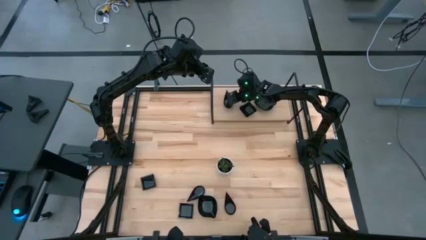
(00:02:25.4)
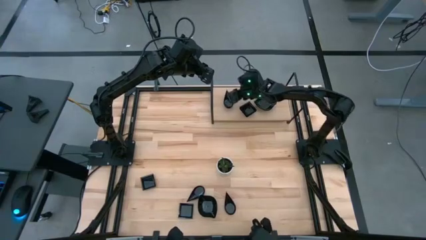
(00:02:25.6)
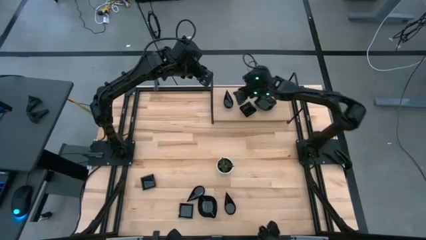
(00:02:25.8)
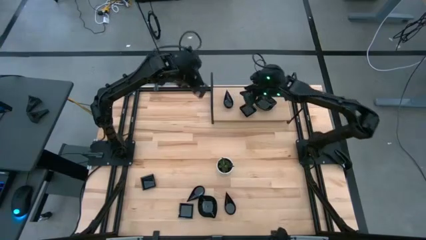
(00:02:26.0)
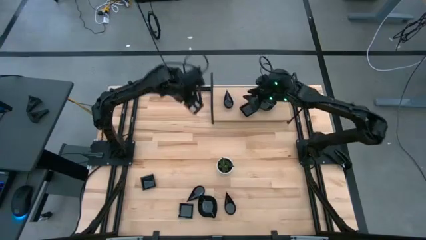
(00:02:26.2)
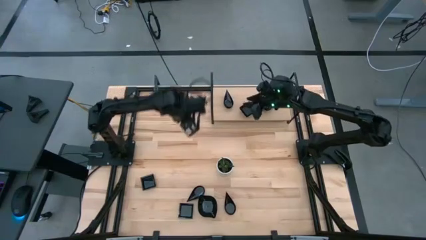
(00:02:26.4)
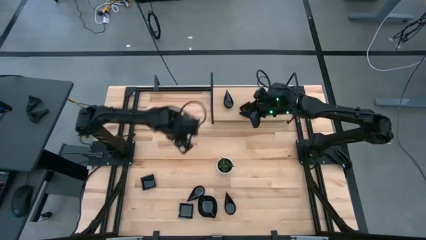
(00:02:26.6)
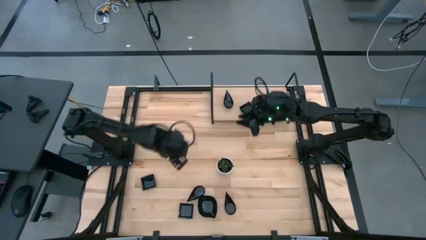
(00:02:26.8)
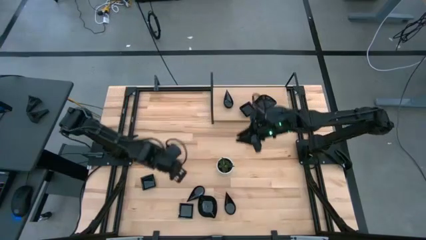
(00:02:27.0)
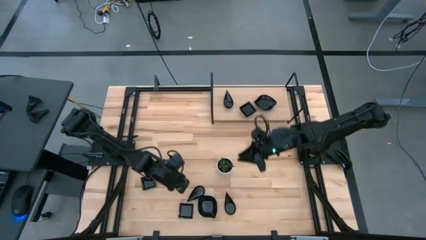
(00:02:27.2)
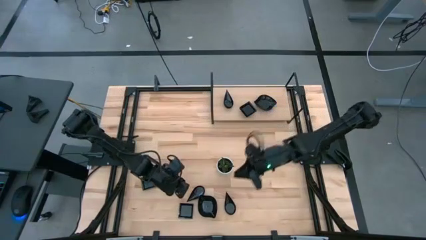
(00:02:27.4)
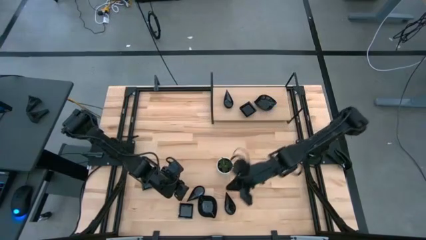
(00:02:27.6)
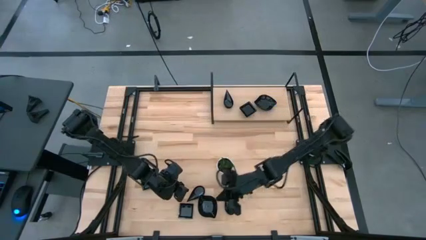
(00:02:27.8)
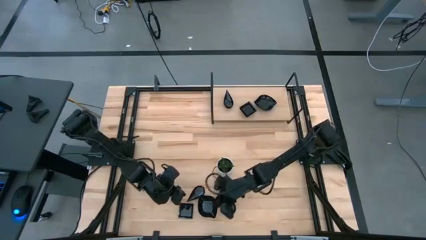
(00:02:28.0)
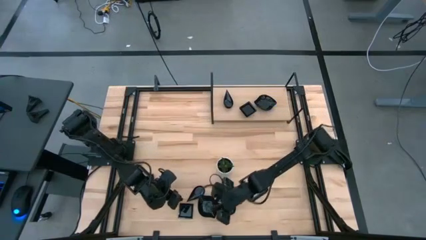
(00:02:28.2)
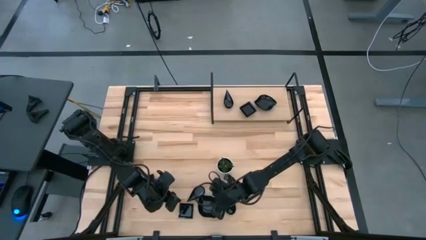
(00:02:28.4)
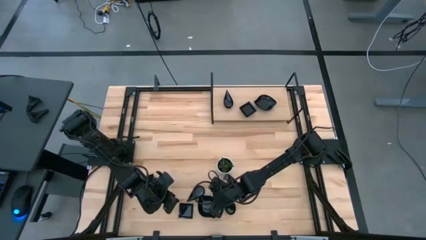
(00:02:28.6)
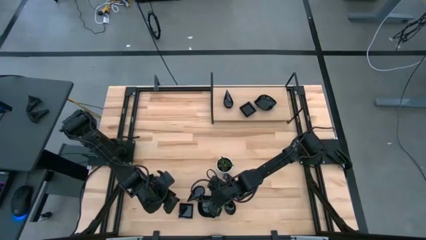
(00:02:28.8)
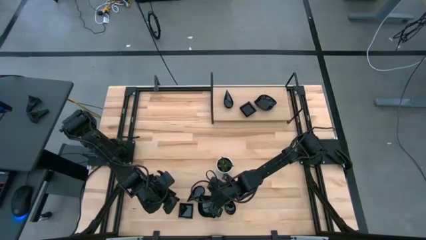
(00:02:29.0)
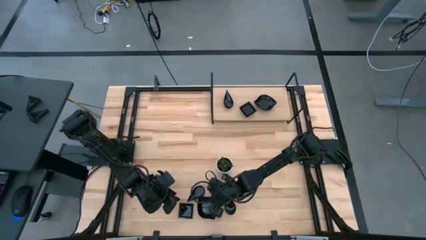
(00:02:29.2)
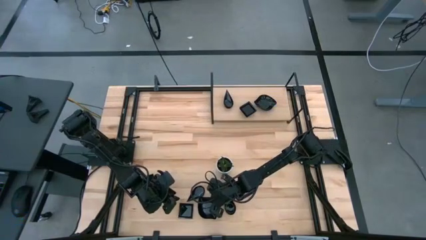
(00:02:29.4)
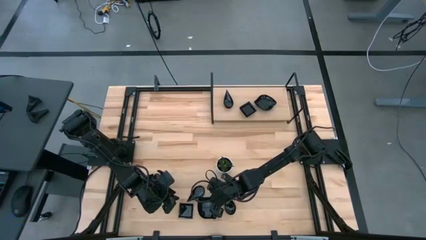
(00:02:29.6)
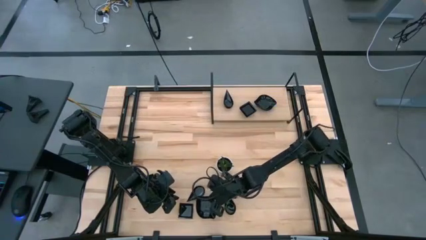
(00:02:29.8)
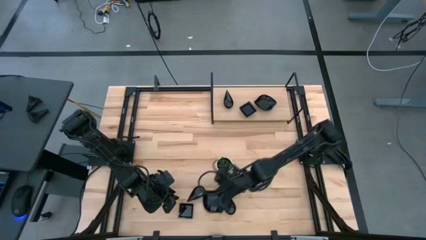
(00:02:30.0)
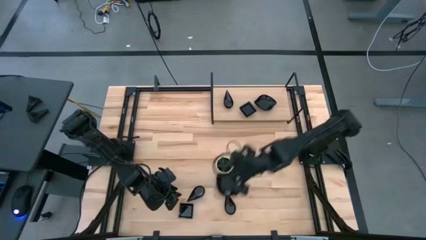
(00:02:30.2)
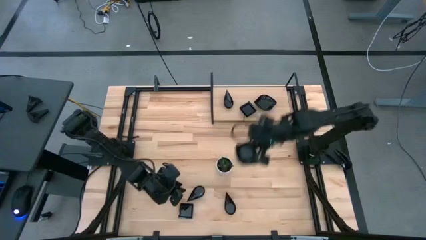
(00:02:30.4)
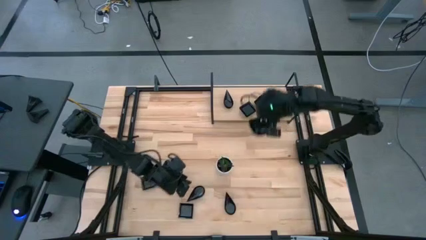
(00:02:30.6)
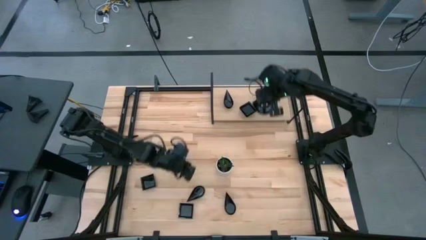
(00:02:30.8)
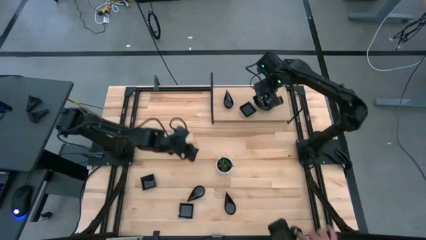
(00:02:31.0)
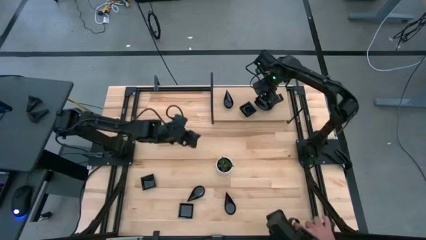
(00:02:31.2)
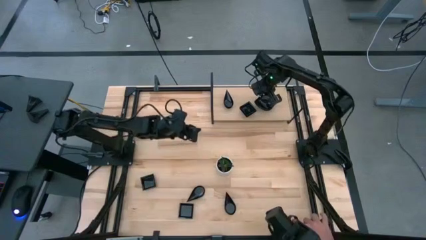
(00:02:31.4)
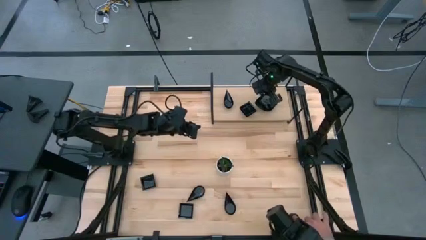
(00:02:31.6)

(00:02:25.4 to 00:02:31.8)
Task: Pick & Place Mini shaped plates
Stack the leaf shaped plate on top of the leaf shaped plate on the shelf

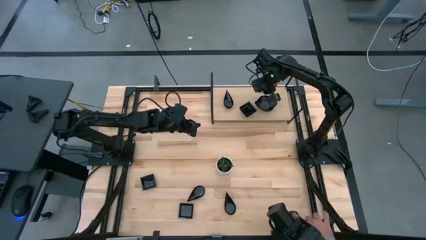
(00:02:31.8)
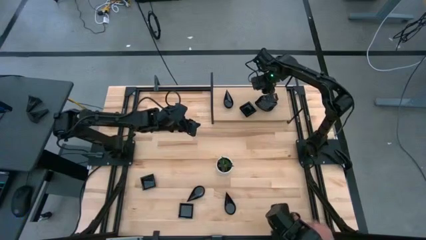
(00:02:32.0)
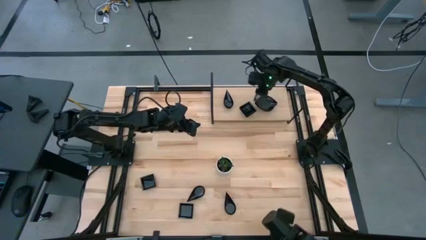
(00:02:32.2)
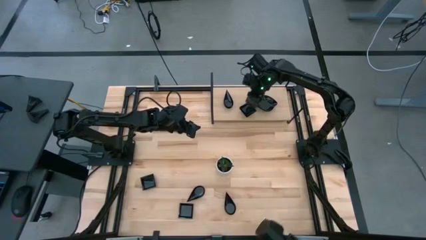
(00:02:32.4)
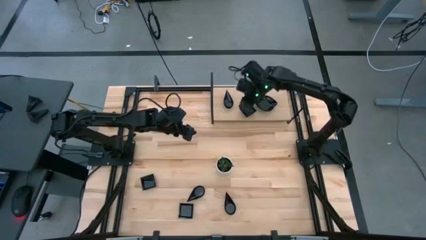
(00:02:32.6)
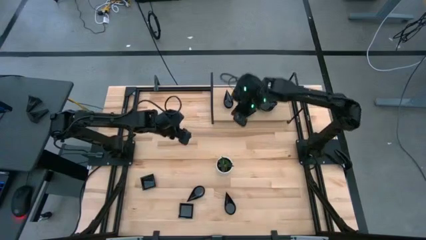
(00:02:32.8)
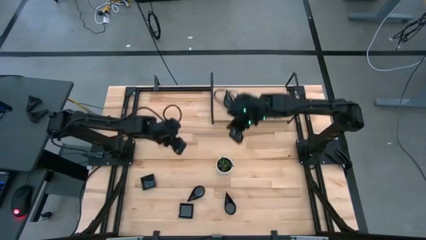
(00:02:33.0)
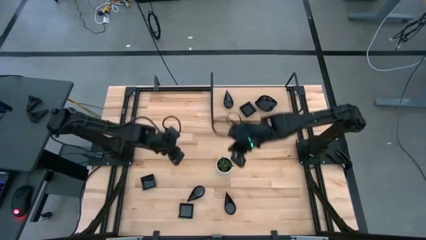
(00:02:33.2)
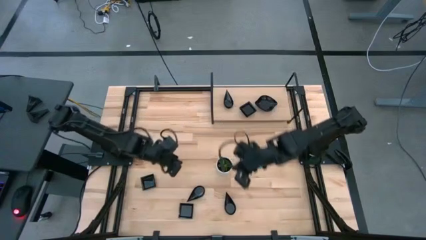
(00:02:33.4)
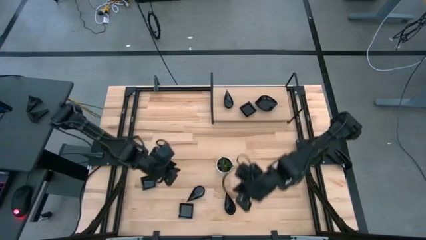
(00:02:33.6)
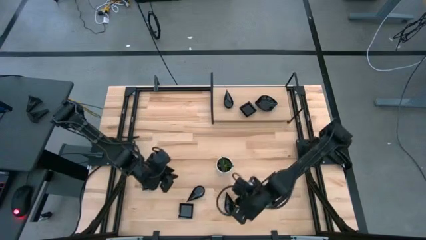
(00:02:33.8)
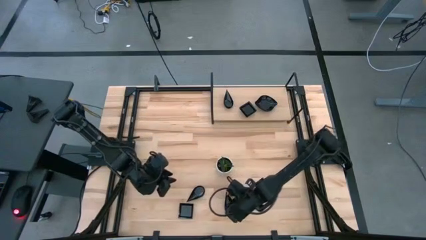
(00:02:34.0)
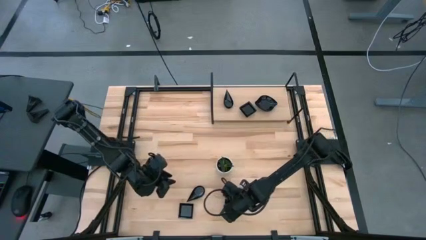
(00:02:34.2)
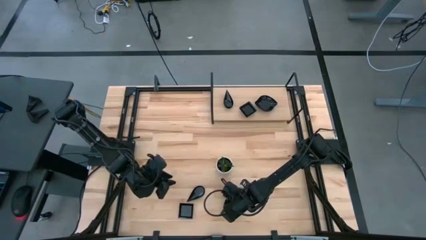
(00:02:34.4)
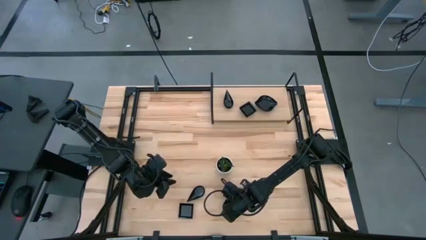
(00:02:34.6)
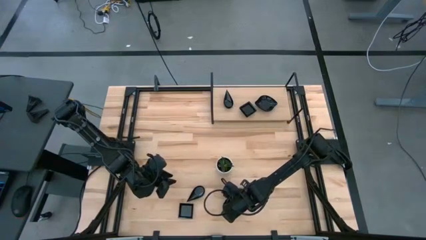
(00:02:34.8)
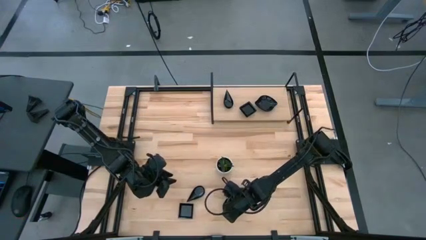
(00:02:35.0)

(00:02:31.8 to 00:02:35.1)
Stack the drop shaped plate on top of the drop shaped plate on the shelf

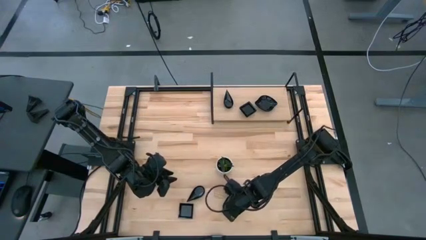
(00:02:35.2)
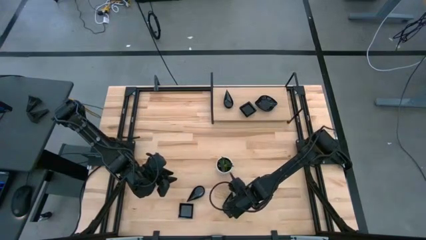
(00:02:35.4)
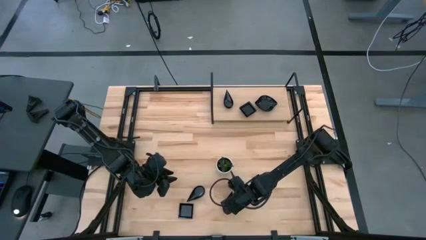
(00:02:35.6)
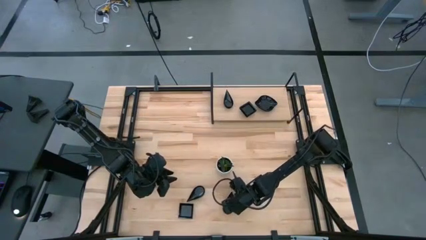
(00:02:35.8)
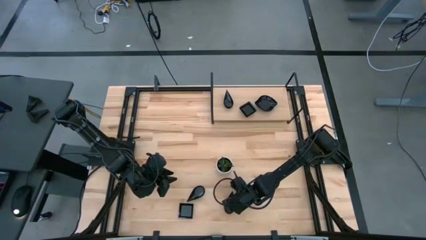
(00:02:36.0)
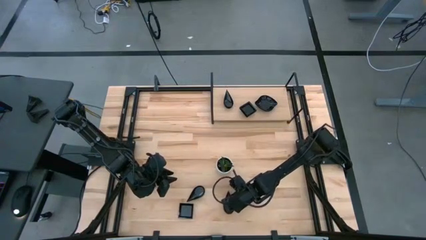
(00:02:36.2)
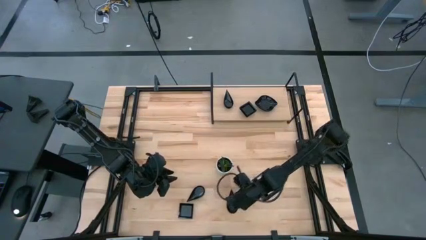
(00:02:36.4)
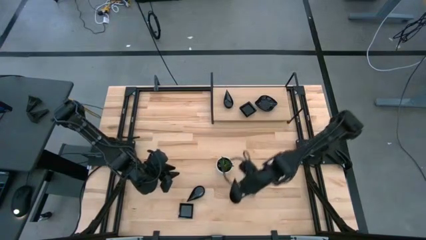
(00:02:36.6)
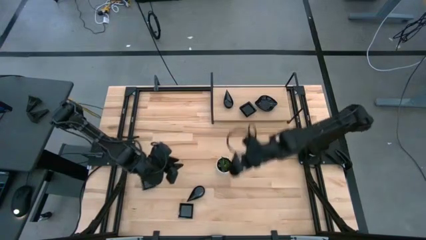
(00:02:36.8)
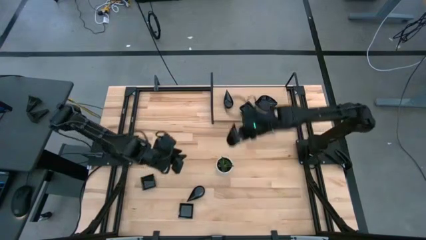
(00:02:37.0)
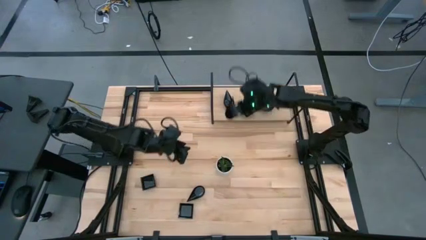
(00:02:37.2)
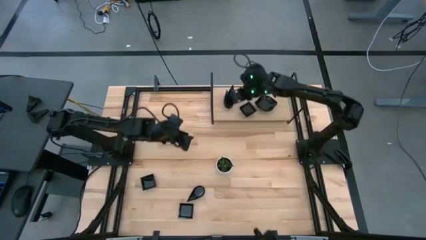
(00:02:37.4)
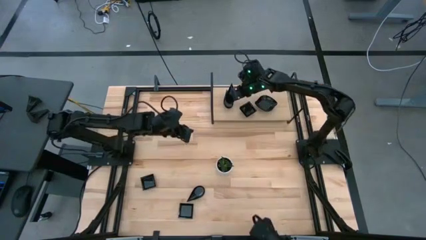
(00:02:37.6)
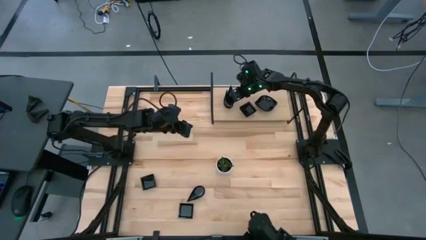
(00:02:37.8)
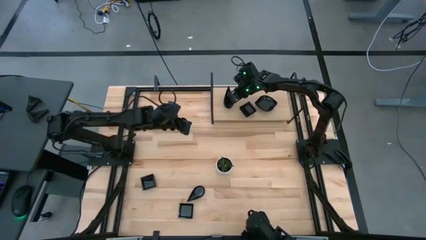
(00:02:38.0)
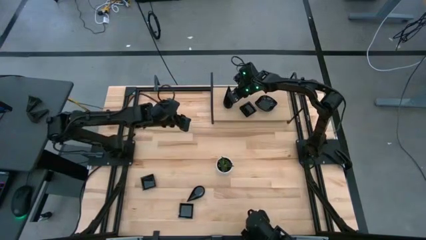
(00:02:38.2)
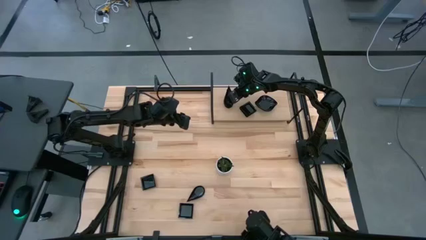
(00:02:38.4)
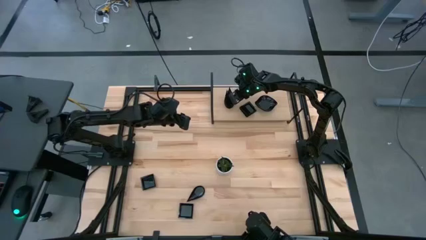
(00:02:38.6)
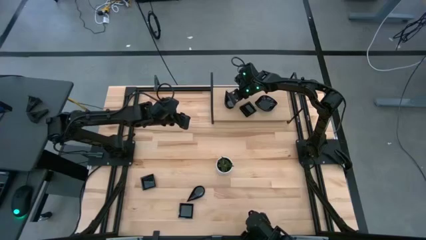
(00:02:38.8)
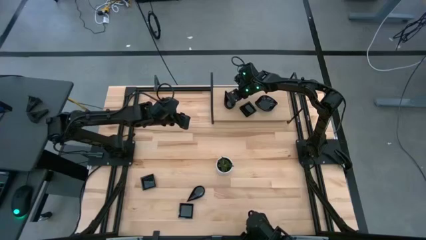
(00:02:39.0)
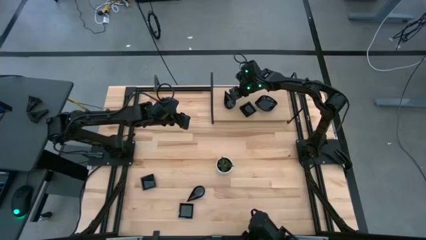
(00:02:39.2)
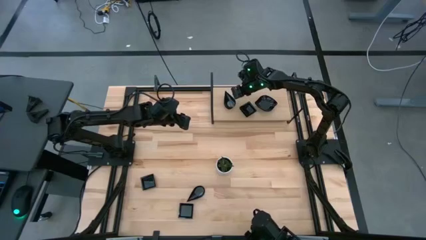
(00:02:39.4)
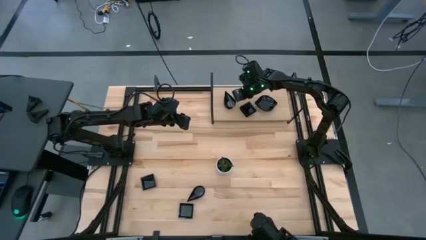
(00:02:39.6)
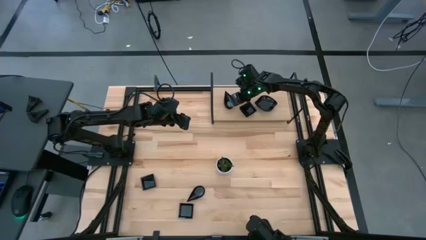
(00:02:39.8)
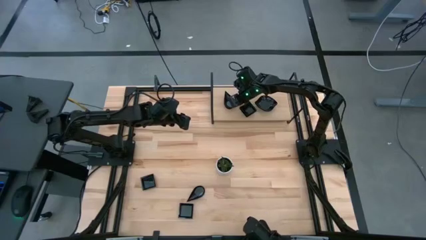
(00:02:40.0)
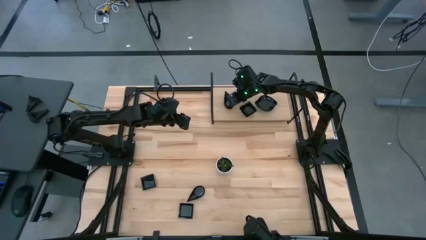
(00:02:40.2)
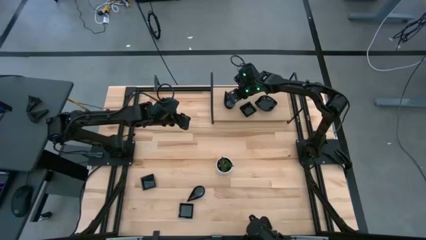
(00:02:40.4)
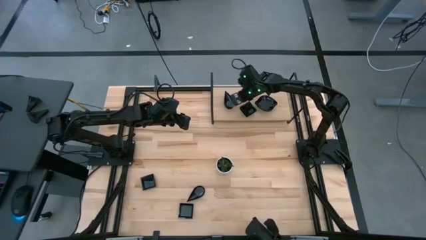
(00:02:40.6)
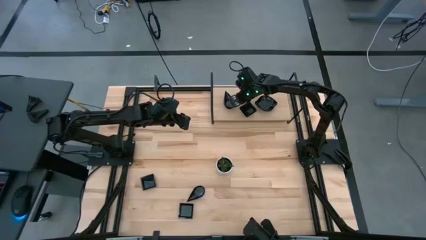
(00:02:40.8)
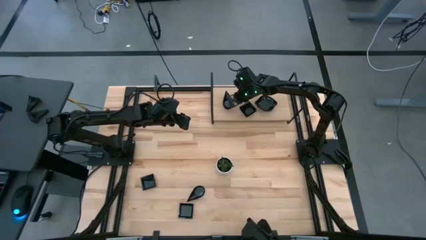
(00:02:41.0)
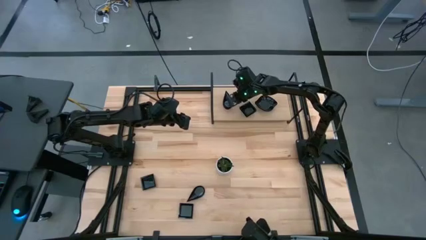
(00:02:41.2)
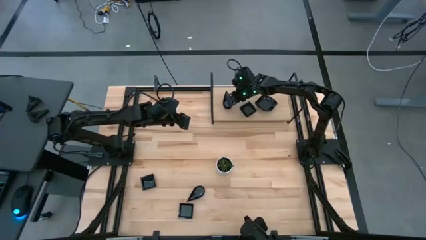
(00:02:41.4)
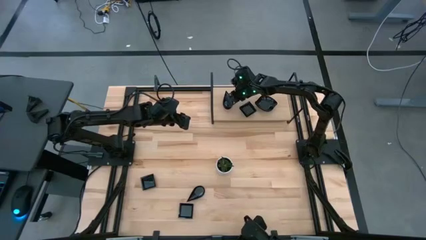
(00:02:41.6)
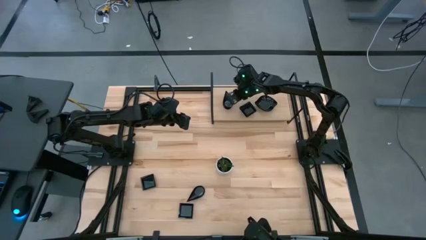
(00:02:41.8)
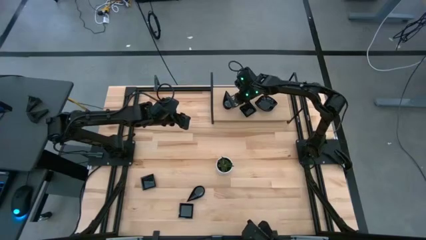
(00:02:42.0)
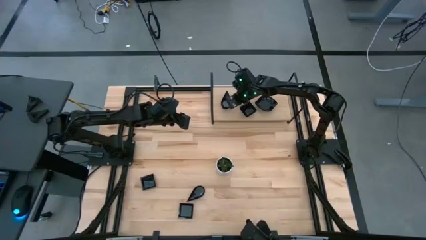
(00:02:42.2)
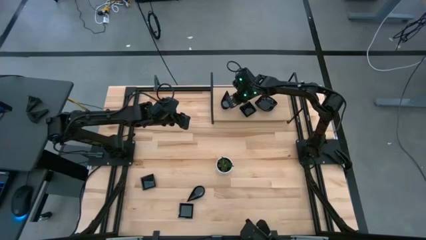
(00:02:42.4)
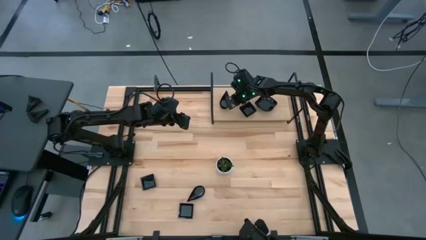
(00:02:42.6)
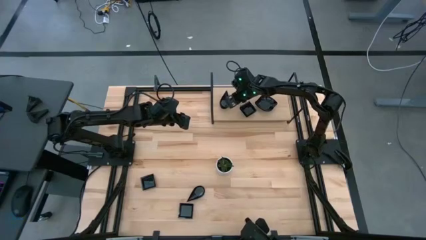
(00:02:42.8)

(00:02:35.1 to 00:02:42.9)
Stack the drop shaped plate on top of the drop shaped plate on the shelf
